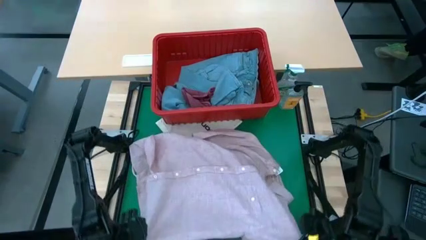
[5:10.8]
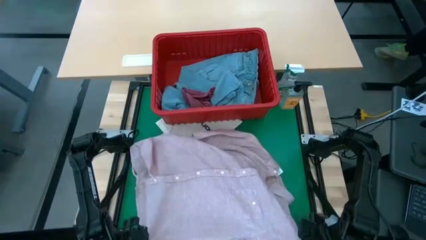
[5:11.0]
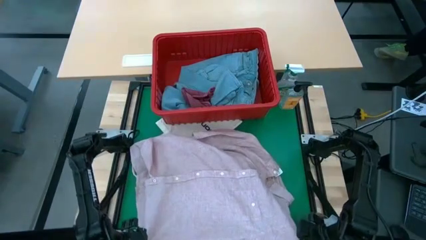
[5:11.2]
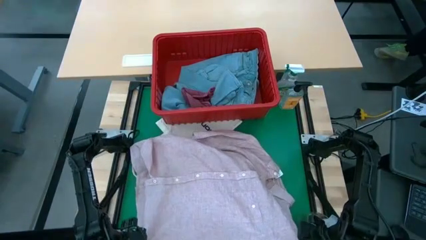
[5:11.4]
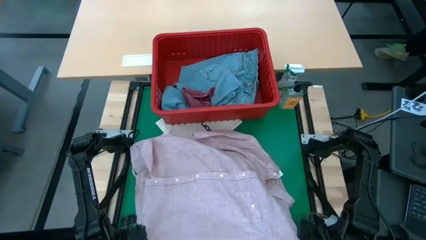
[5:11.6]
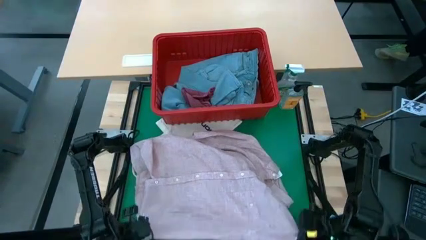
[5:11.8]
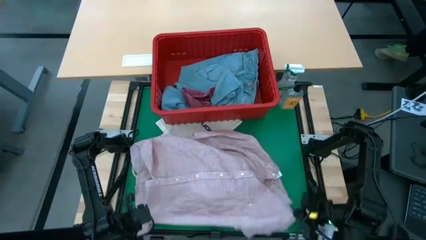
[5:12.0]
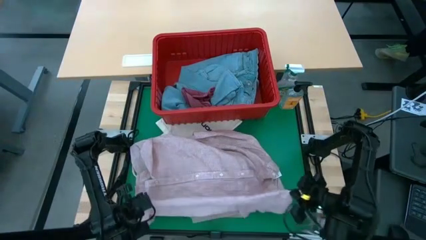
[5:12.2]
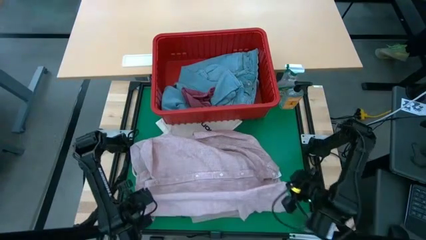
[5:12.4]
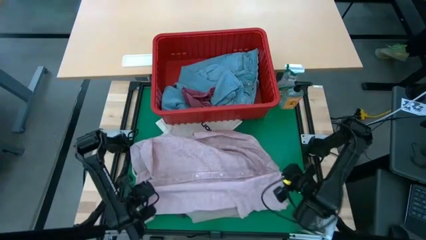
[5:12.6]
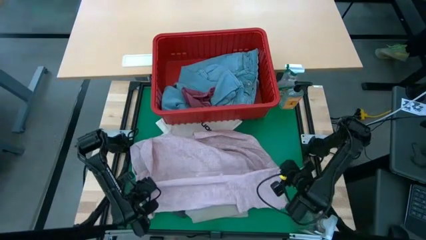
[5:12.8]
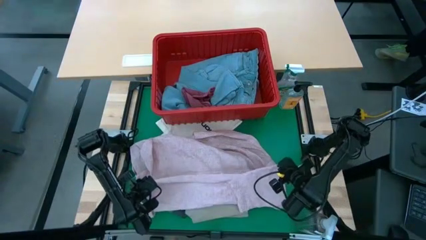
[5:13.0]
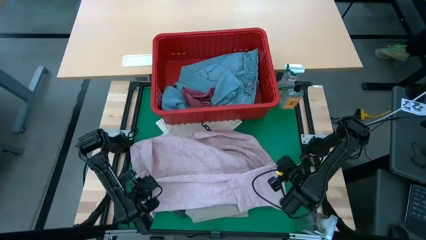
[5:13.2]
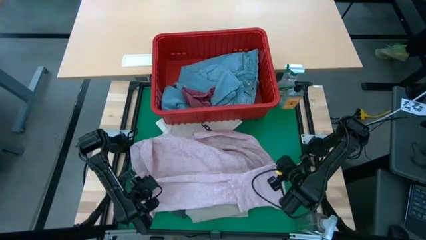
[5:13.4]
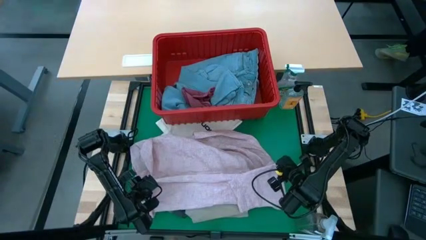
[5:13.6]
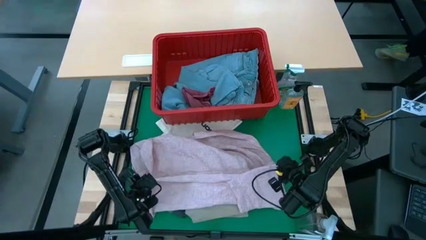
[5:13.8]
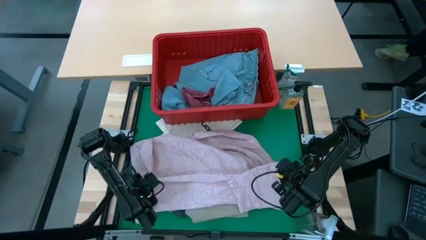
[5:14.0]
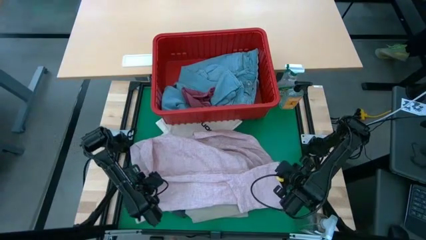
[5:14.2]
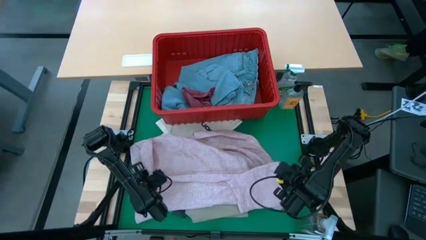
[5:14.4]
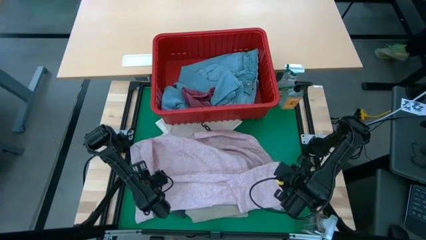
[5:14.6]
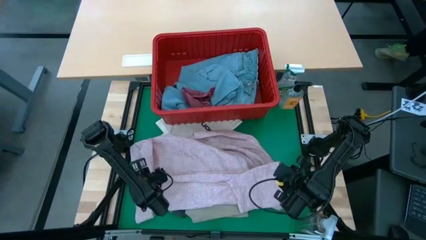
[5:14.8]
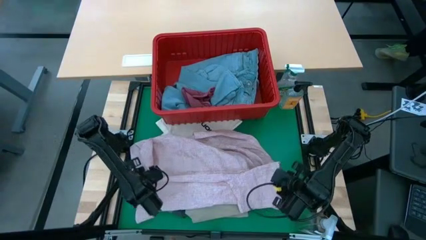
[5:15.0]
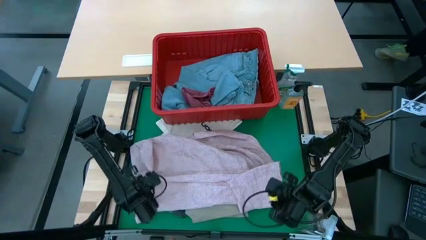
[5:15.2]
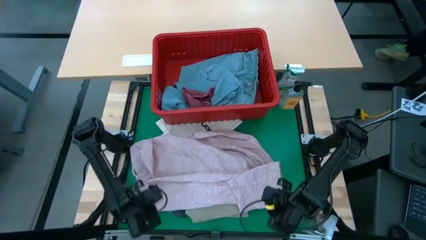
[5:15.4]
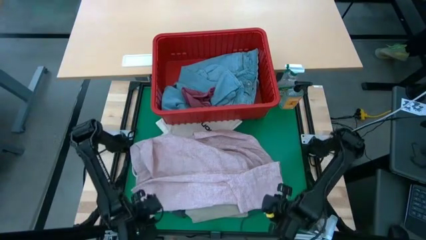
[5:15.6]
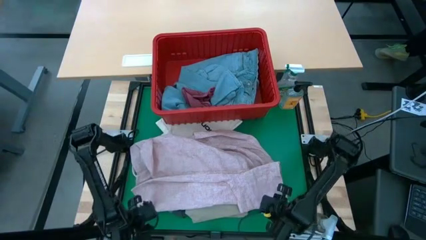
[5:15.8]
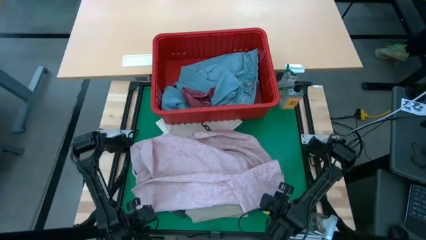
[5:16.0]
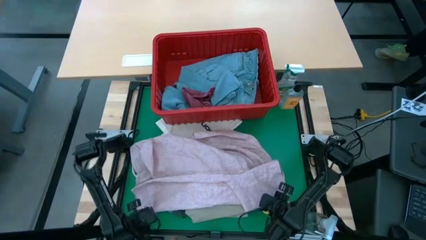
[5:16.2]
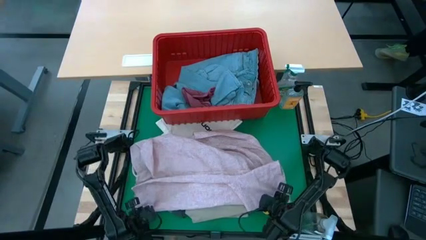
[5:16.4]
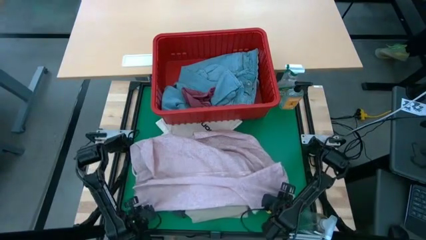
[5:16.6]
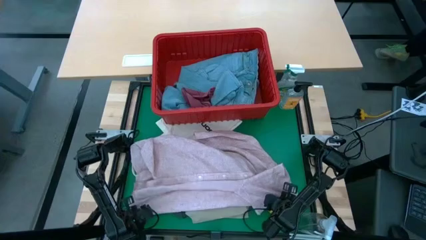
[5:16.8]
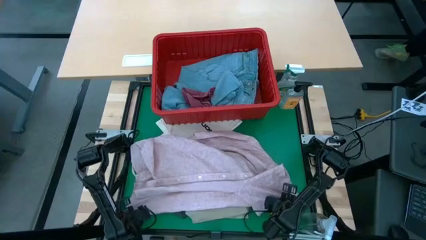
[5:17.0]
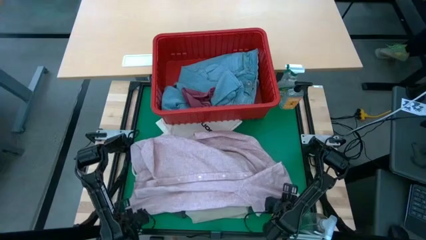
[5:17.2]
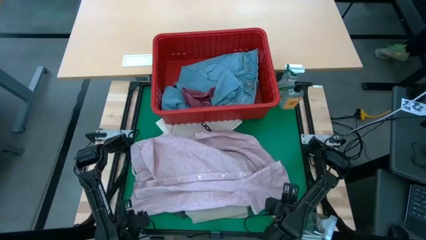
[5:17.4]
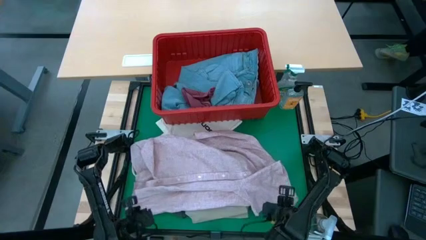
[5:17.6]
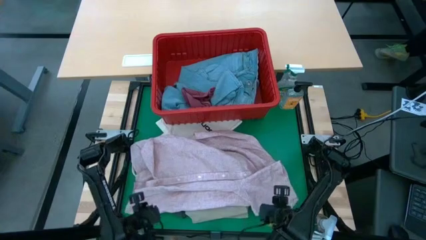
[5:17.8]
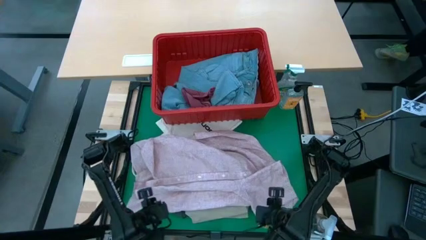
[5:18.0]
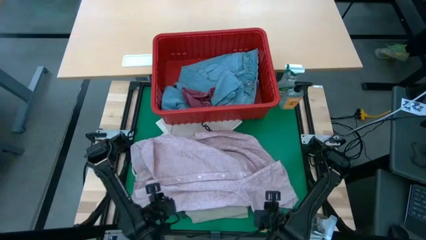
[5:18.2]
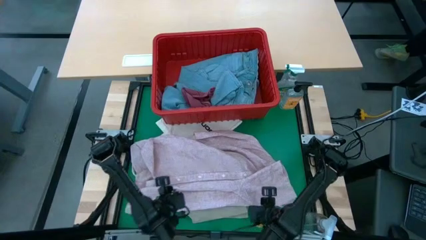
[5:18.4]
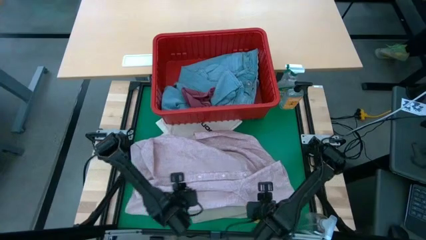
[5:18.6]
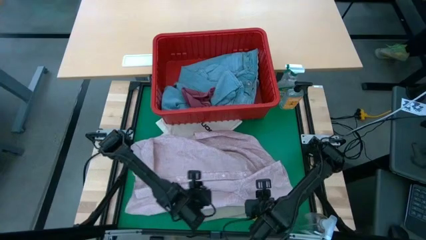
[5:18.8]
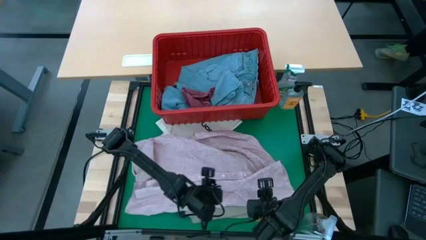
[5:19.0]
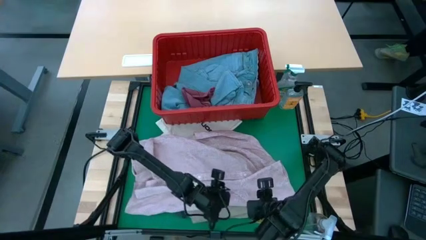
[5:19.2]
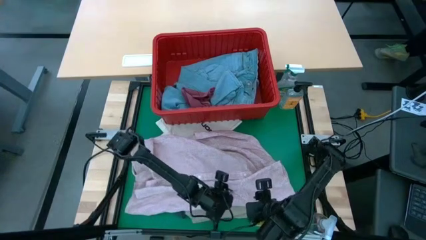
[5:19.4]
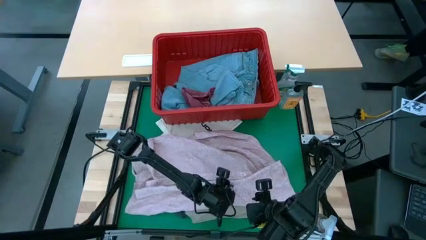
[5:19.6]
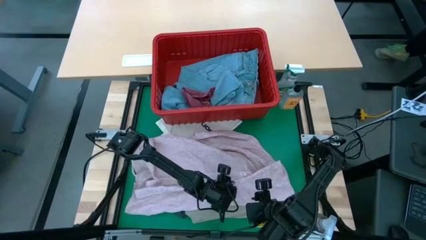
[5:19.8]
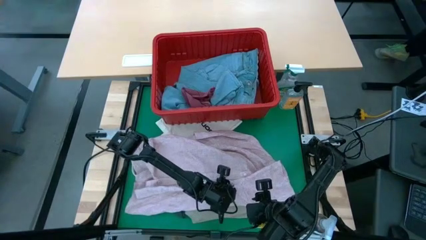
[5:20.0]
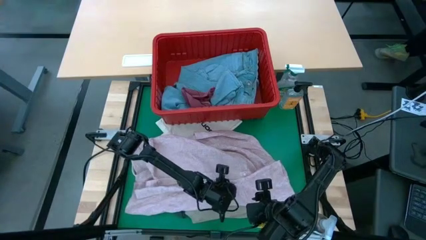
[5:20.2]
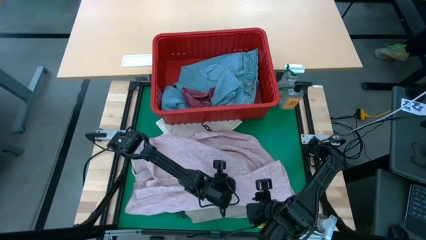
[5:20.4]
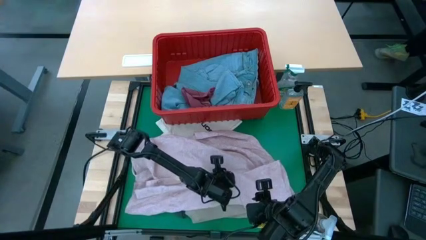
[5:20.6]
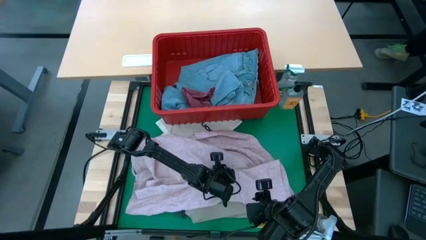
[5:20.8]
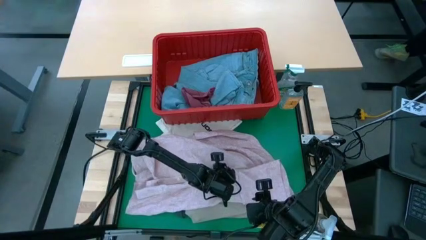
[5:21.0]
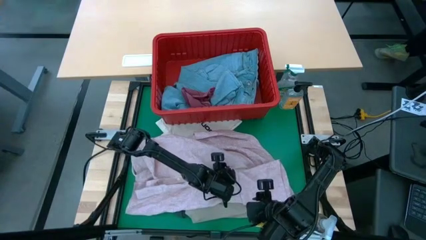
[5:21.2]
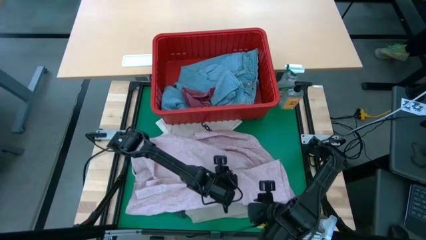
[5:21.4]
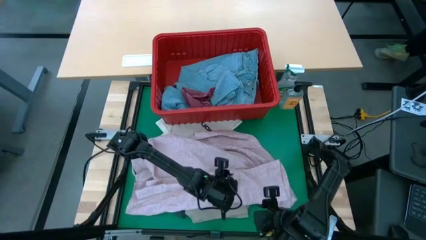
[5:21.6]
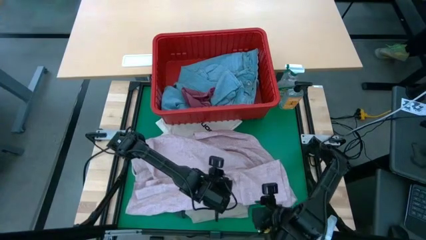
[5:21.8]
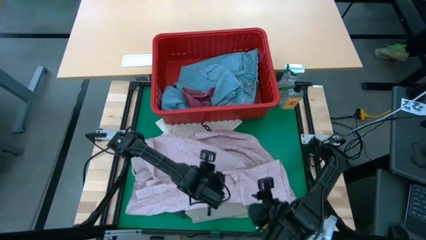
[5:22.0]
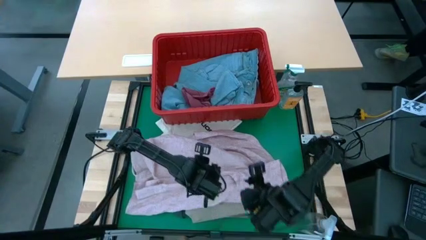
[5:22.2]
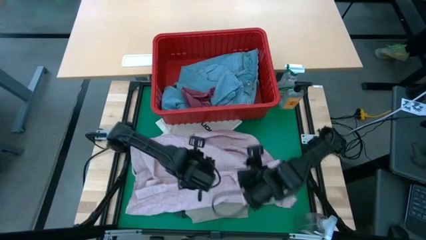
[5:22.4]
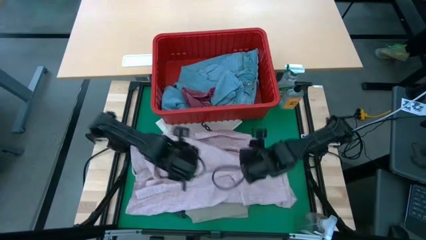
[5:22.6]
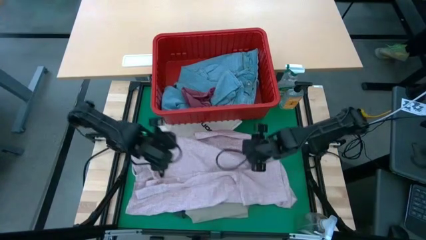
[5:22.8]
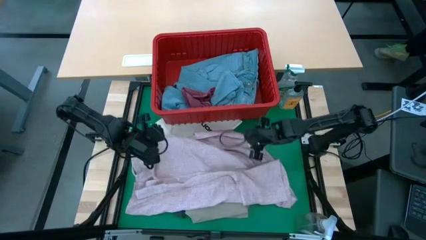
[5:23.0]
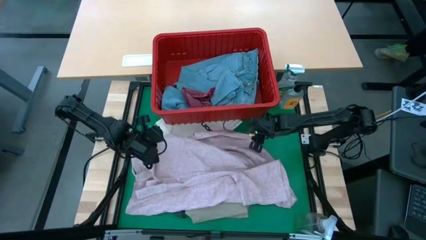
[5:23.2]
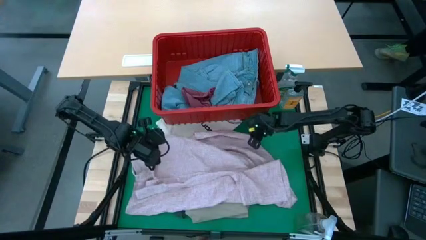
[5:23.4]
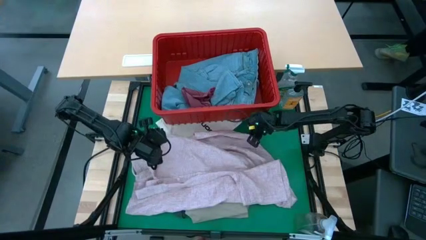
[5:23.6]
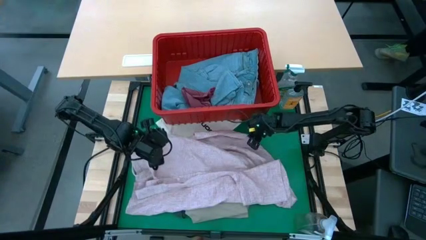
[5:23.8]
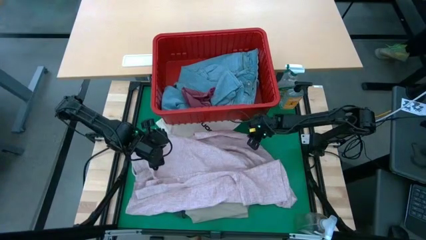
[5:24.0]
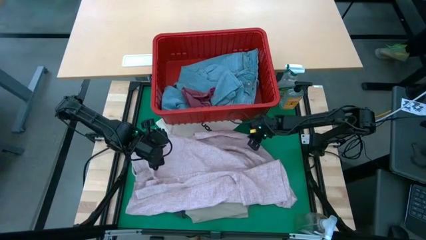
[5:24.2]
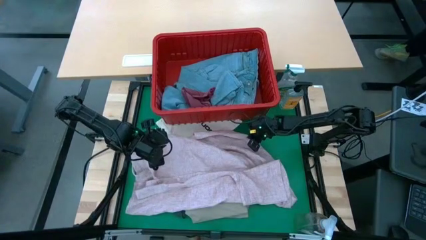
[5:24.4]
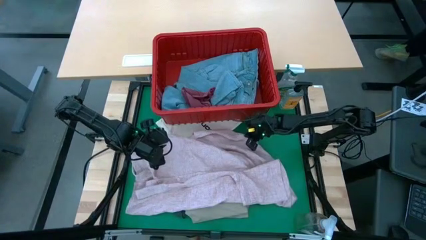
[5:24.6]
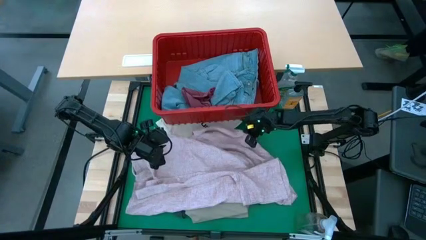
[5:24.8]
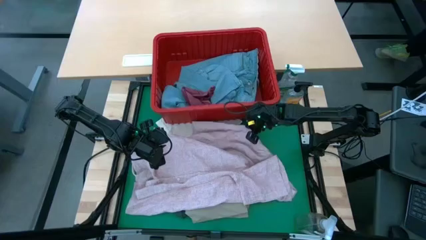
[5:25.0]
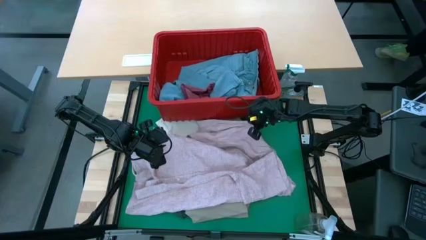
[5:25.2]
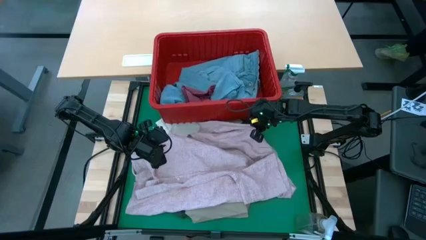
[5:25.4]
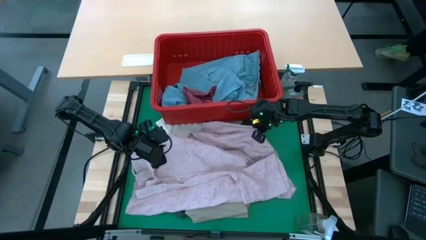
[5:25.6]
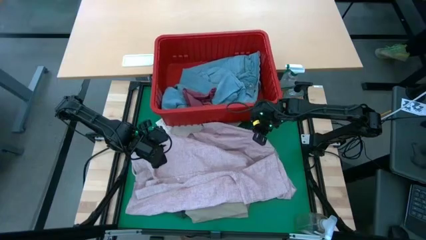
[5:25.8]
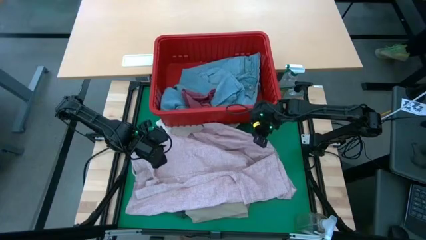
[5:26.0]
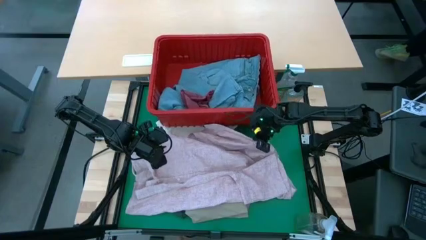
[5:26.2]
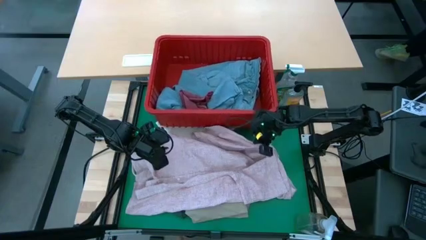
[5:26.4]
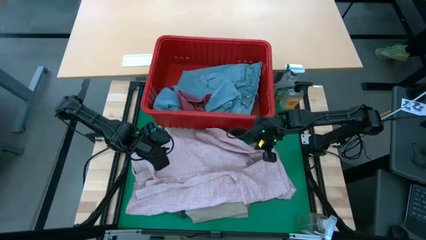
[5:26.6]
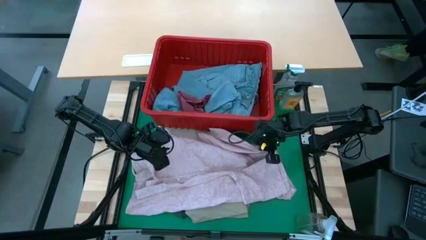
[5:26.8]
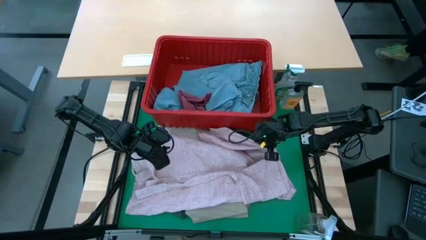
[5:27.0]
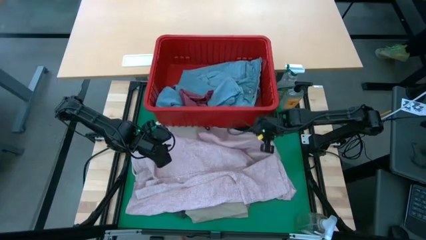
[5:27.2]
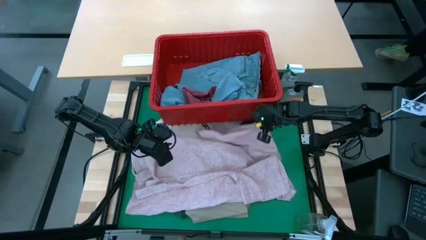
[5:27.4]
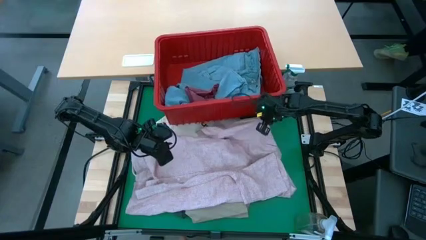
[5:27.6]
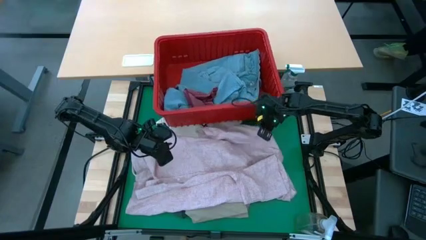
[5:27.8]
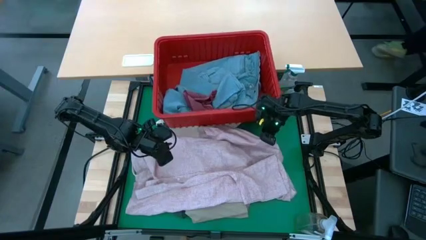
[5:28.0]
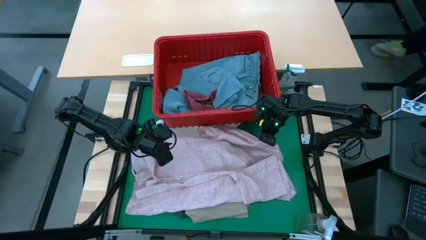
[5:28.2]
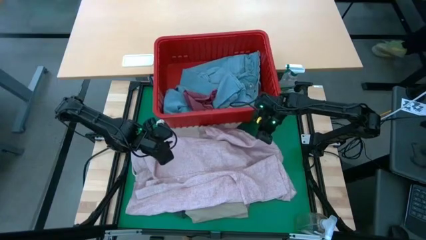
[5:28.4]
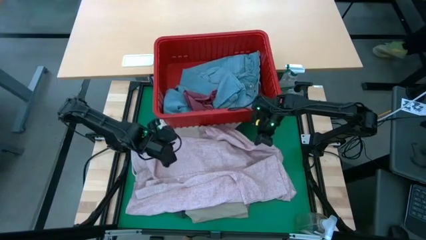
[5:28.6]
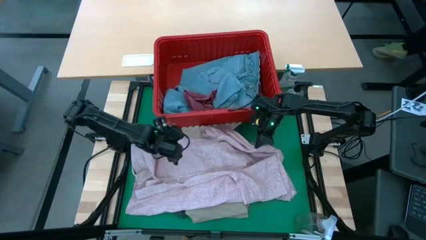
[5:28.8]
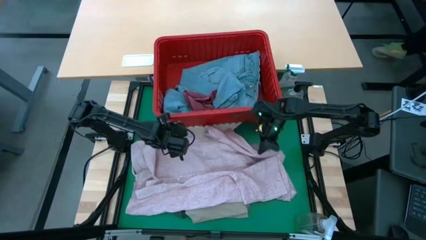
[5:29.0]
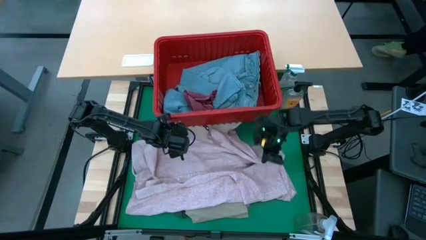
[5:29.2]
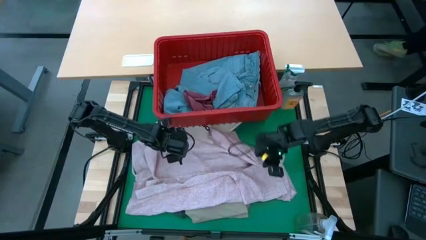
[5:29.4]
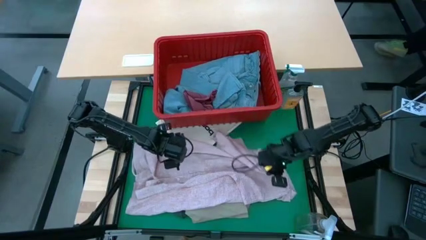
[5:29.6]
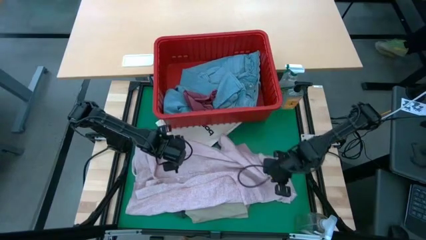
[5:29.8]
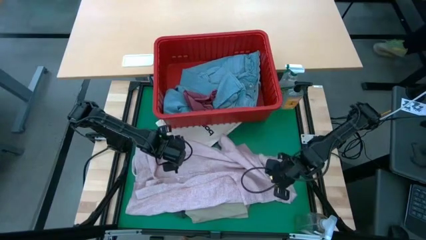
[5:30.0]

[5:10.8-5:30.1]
Task: Fold laundry
Fold the pink shirt
